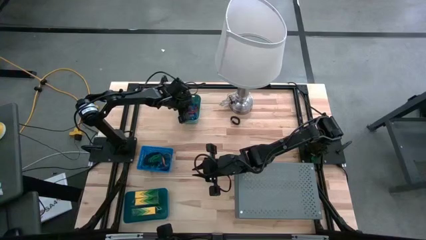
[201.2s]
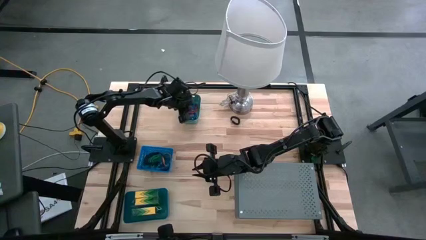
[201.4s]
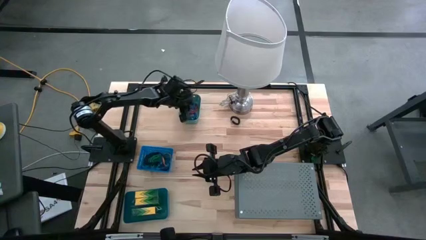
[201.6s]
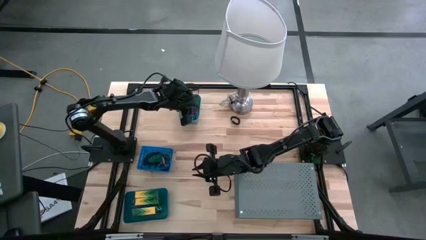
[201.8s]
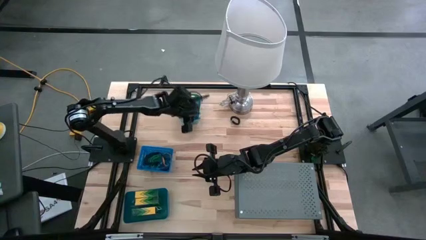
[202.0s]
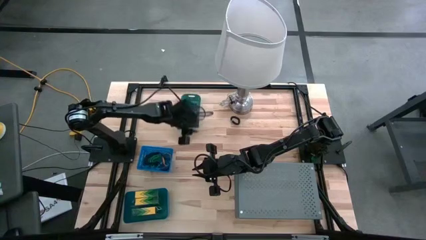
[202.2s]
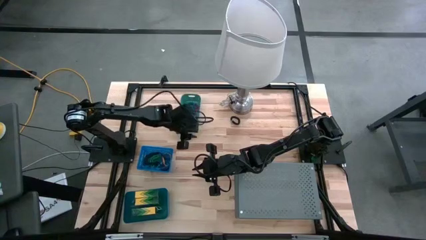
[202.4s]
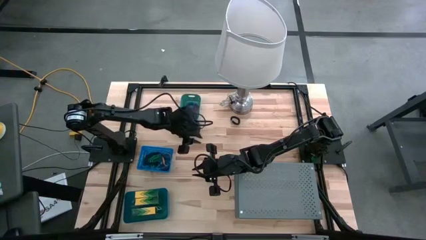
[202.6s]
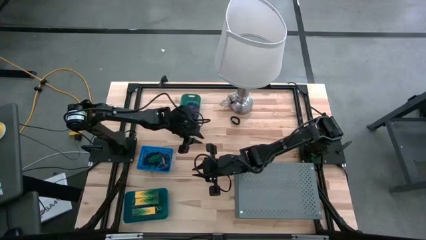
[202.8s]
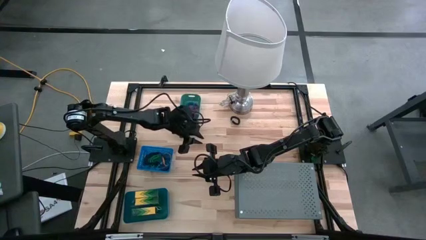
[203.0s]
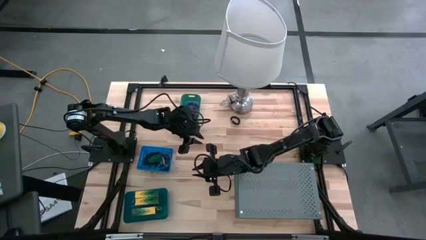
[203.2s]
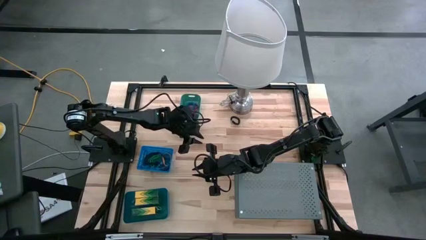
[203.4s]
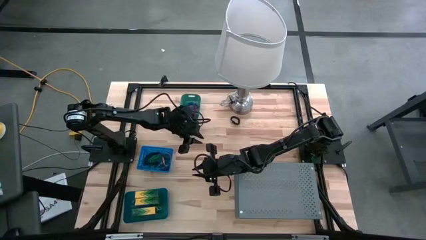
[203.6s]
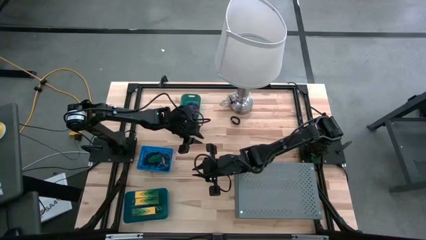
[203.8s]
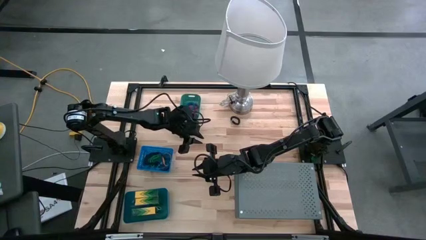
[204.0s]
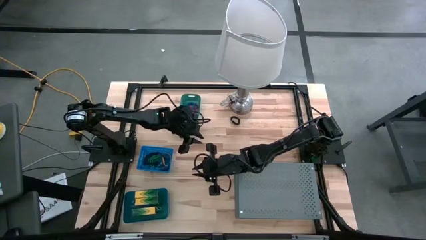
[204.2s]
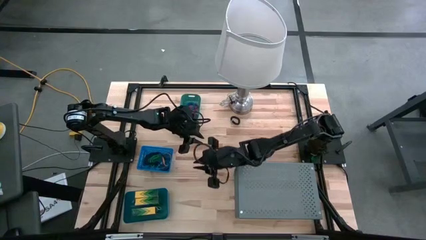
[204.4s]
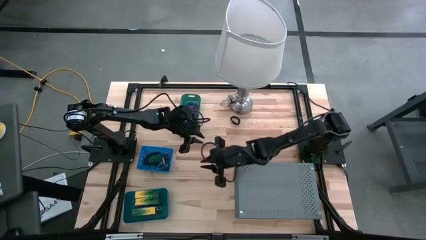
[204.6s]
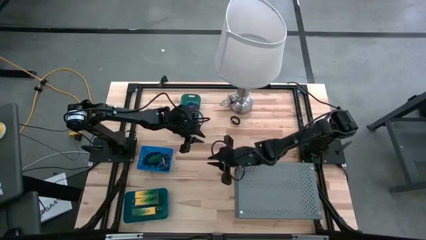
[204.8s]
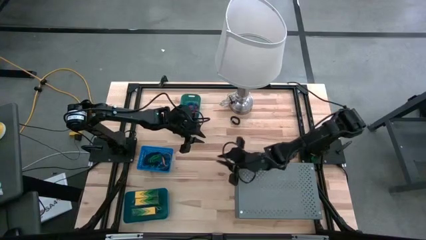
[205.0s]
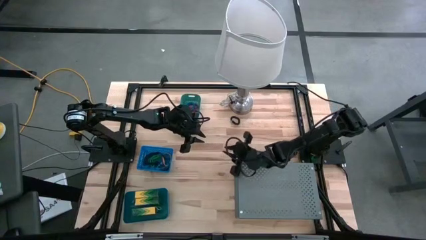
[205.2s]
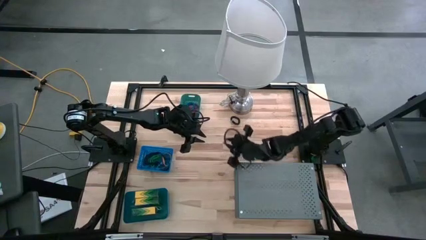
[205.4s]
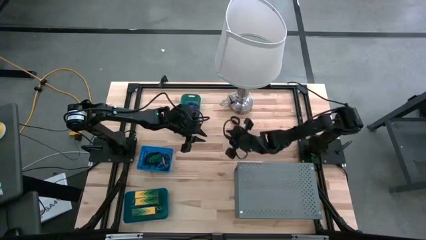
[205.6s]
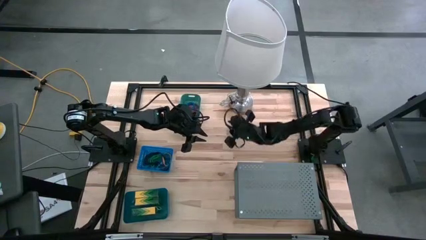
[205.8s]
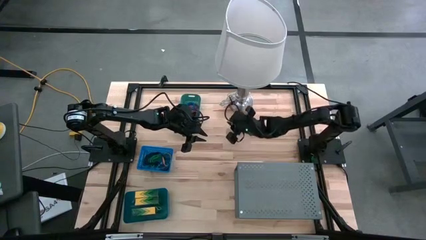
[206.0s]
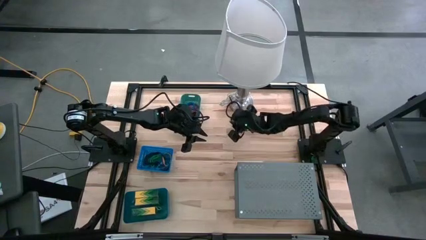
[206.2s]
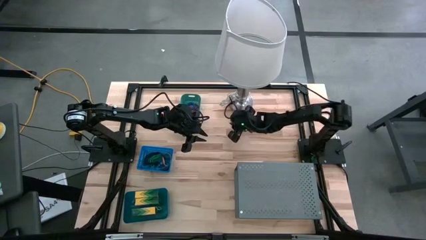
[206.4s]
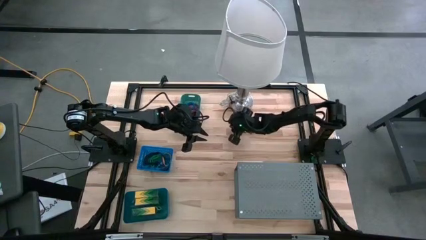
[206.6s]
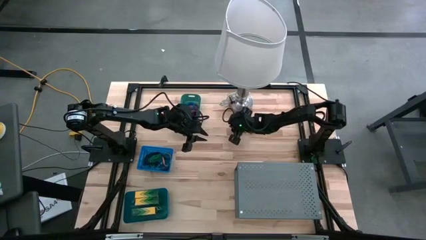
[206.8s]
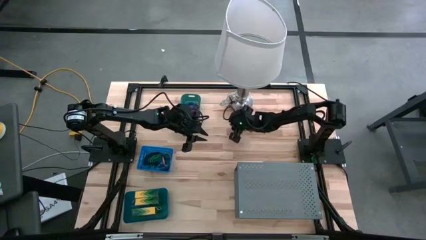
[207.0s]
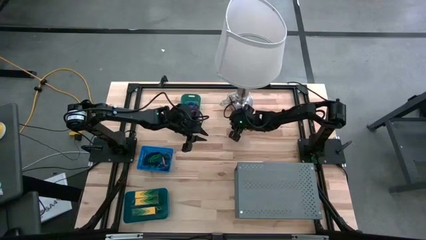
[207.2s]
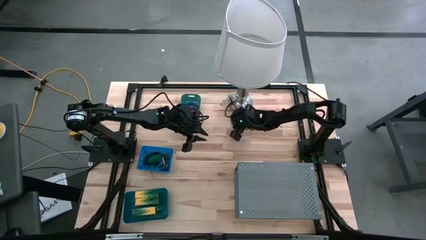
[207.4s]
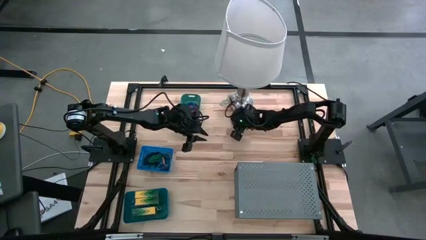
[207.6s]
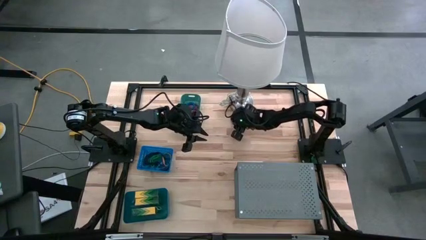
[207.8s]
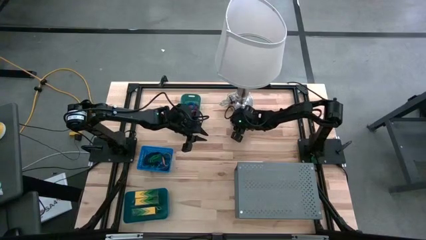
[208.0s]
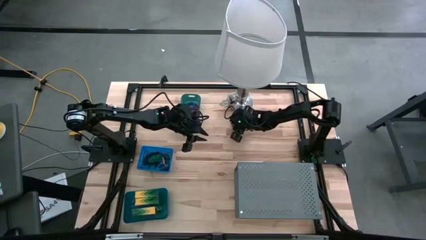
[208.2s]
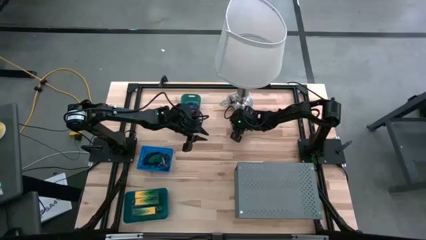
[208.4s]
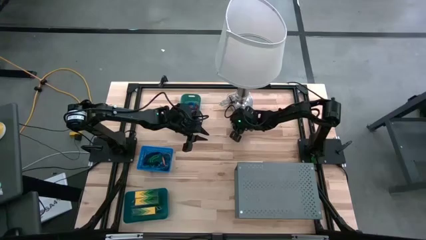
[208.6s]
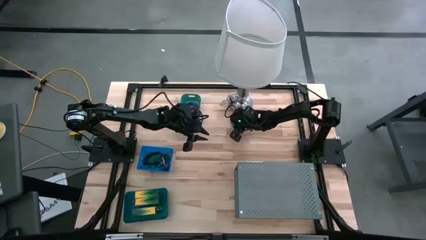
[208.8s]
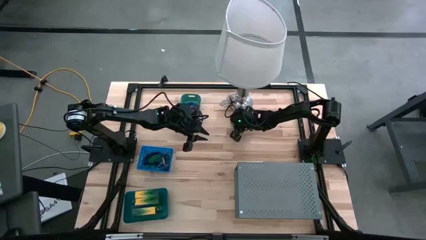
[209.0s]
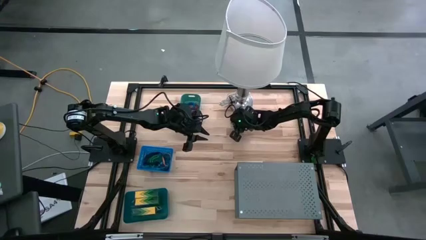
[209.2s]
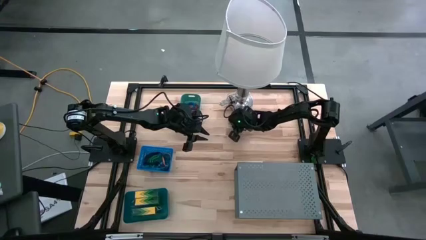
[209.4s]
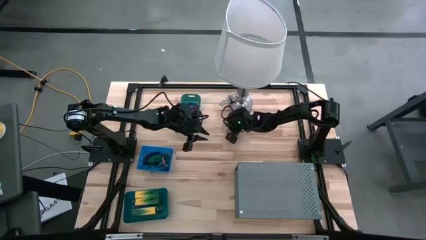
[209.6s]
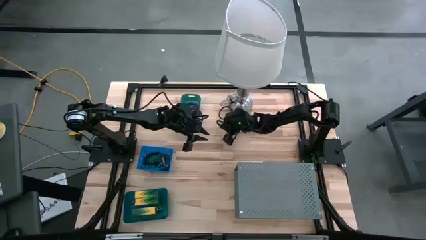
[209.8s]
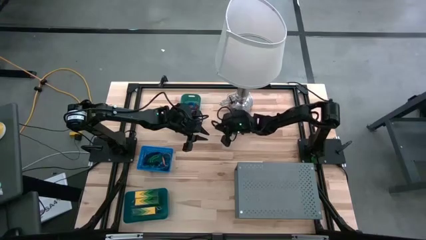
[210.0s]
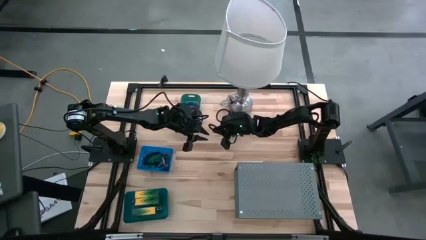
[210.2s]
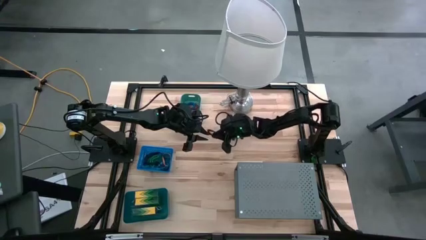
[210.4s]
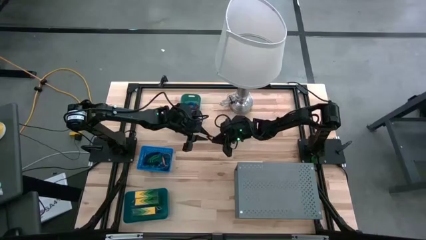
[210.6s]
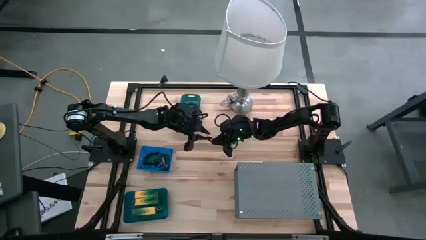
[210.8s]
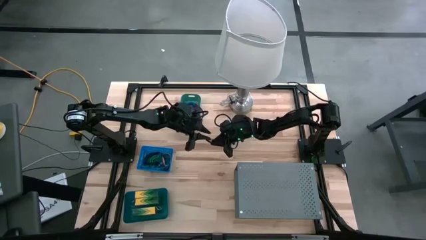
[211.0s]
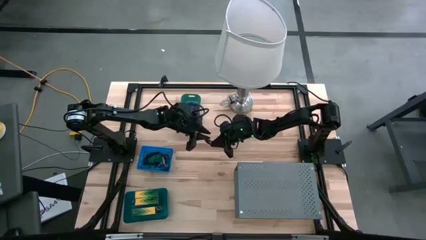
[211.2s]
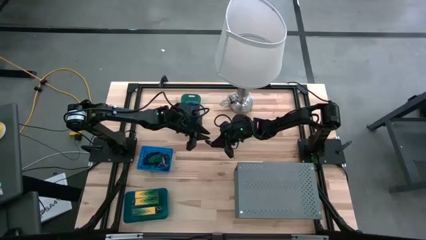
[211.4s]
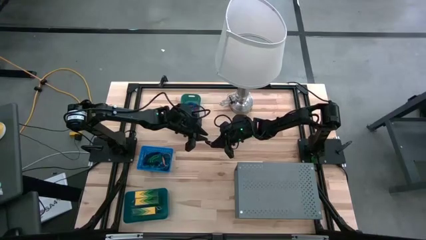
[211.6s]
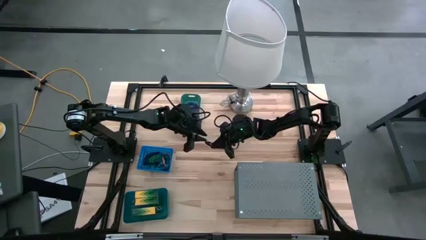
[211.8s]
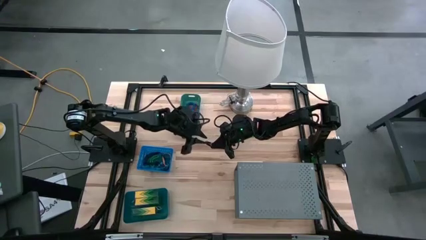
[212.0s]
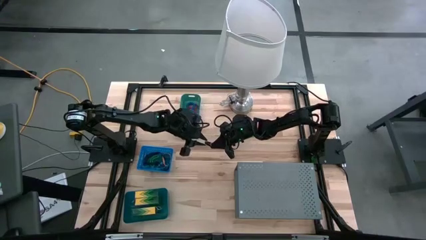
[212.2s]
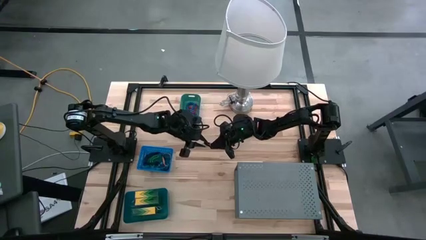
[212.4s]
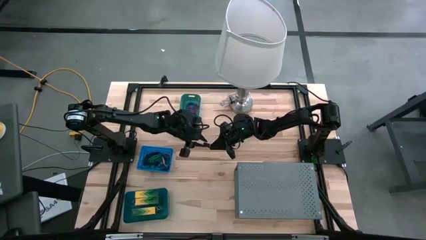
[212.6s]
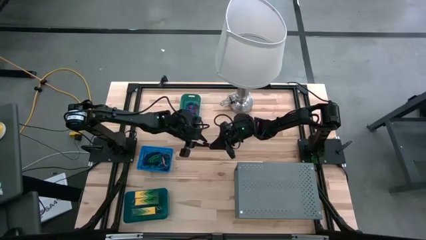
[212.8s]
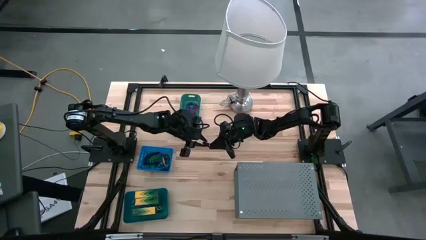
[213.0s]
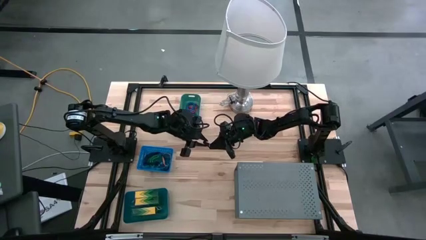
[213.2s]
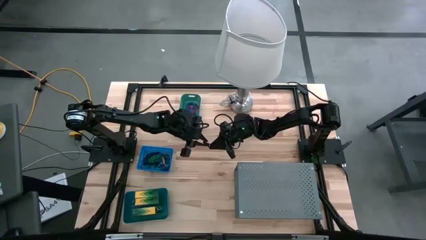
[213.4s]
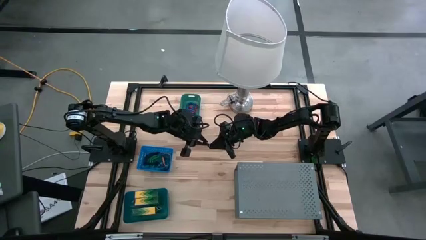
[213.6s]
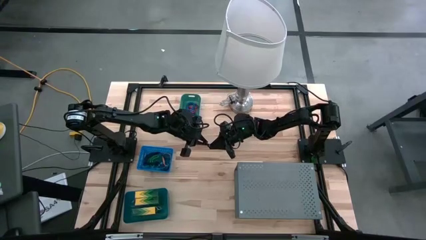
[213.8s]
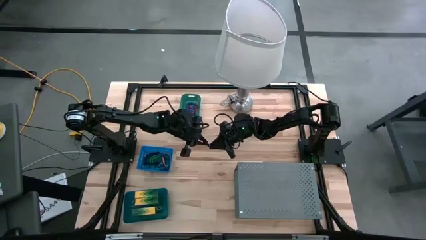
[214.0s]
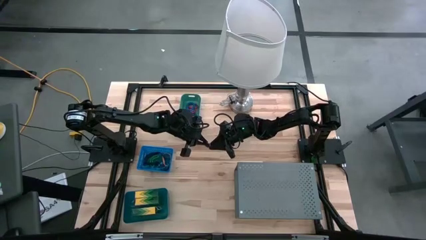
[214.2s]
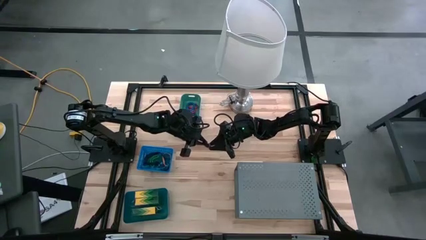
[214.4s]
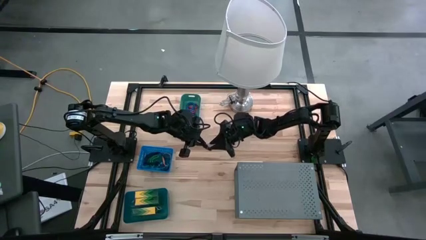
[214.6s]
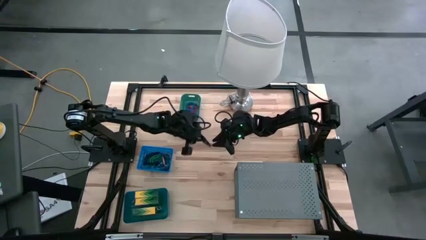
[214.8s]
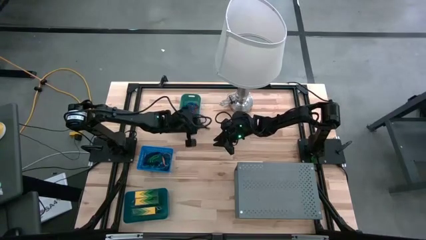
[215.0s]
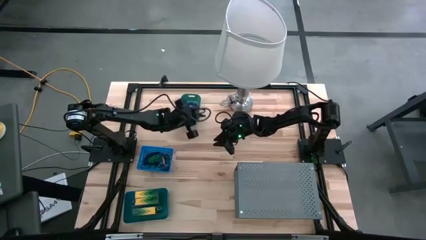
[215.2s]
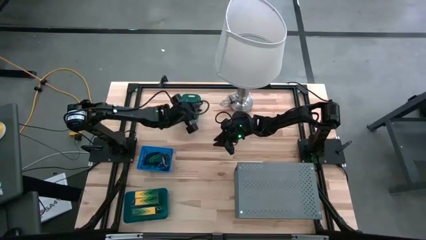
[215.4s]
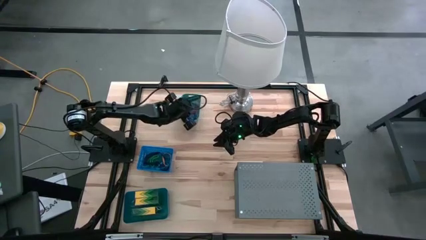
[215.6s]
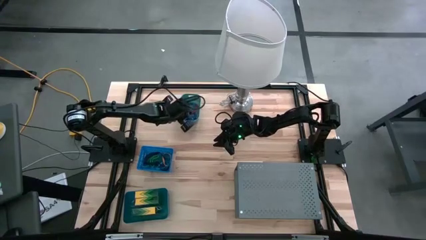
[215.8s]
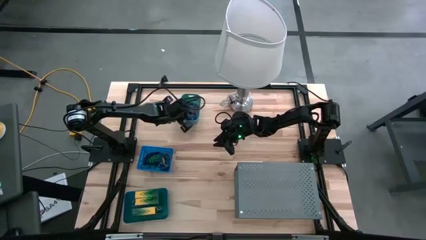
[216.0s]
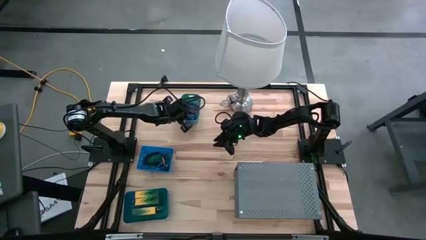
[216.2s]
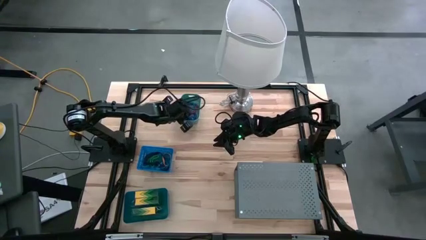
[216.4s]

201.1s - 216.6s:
Task: Pick & Place Office Desk Supplies
Put the black spring rubberband into the green bin

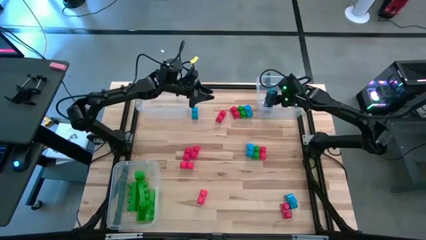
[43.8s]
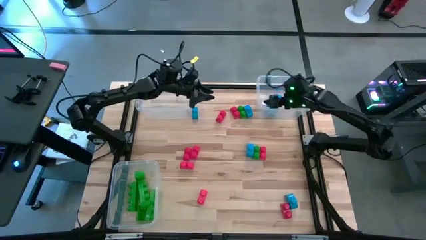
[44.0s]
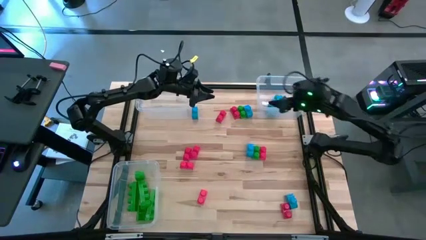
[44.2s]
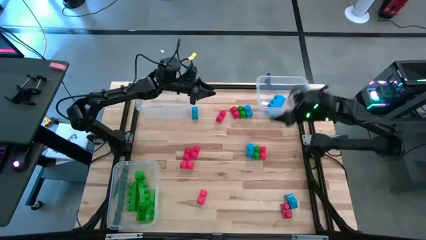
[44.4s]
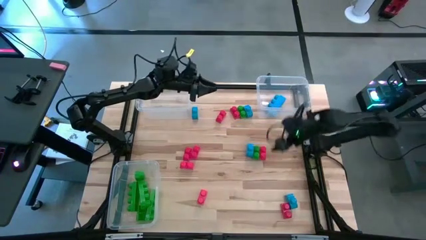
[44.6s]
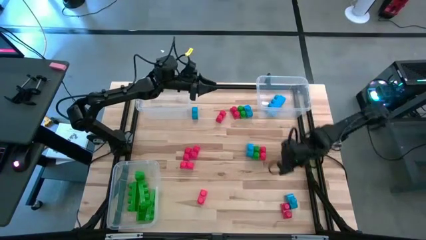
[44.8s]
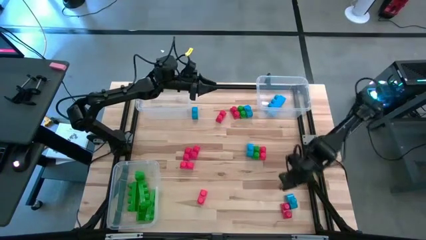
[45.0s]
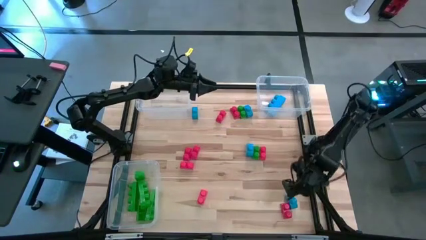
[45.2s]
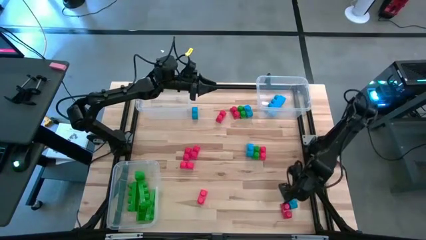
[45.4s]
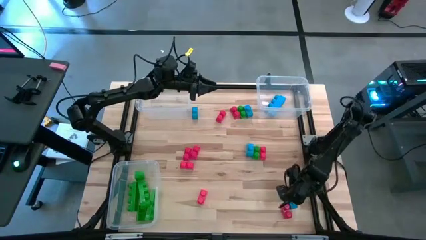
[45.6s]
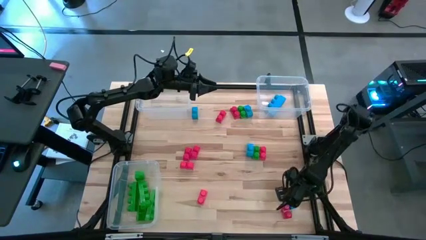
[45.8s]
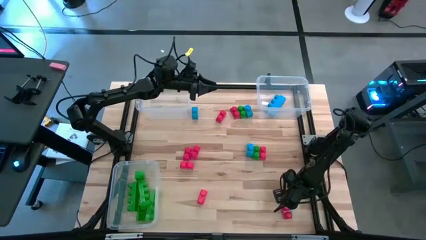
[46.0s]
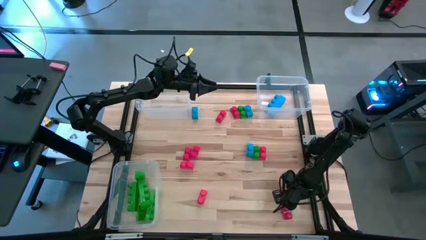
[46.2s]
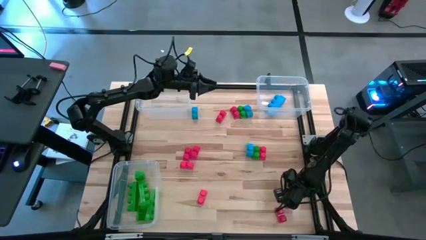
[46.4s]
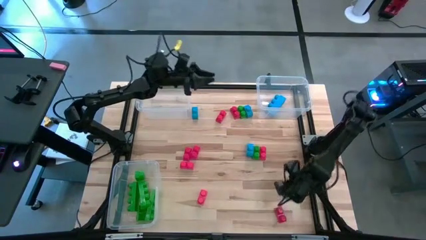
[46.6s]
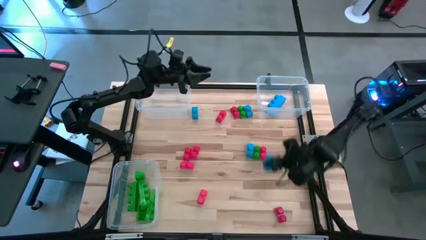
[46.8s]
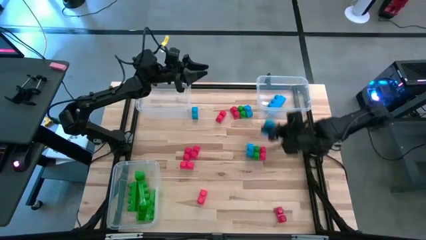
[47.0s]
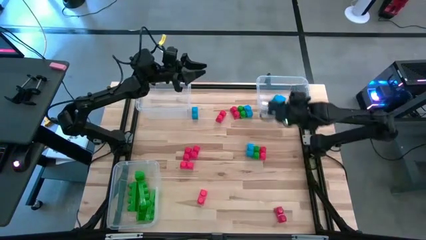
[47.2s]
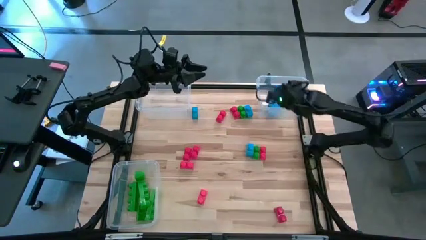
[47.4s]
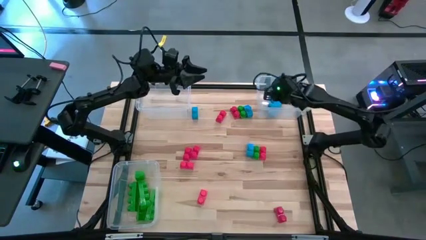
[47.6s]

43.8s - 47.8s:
Task: Sort blocks
Put the blue game piece into the top right transparent bin
